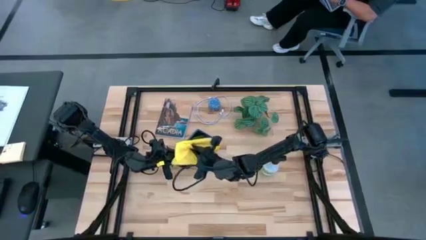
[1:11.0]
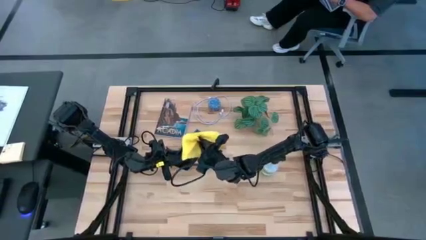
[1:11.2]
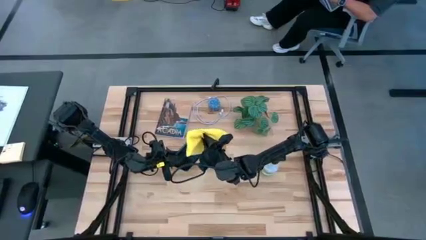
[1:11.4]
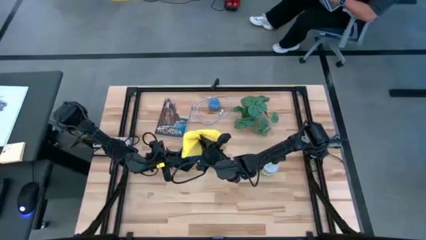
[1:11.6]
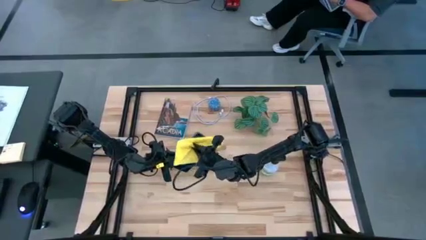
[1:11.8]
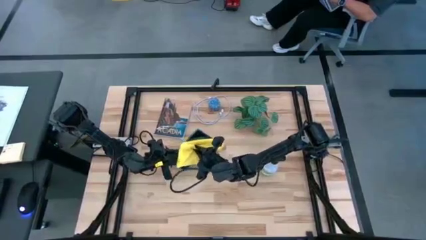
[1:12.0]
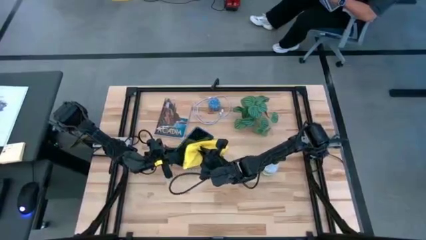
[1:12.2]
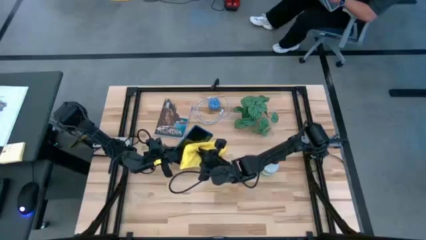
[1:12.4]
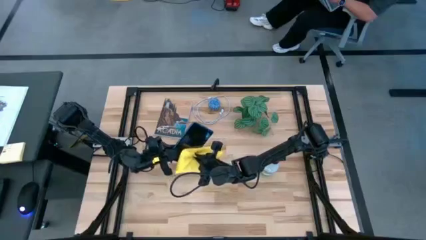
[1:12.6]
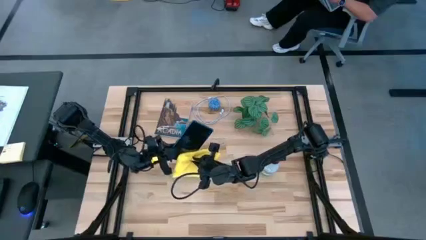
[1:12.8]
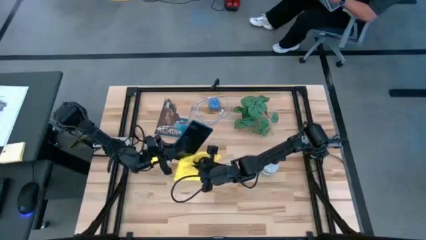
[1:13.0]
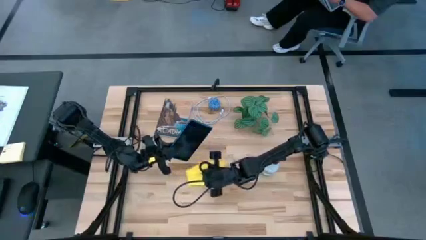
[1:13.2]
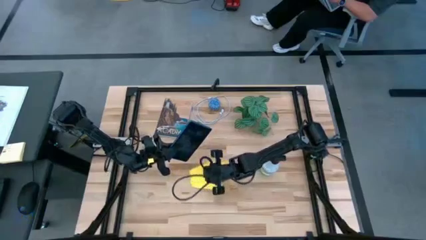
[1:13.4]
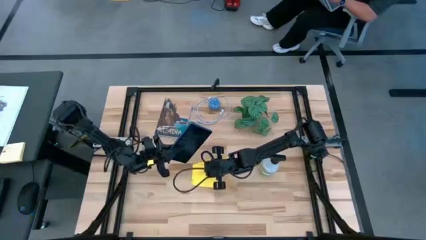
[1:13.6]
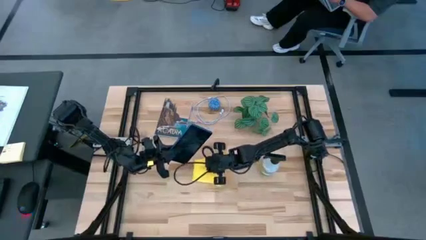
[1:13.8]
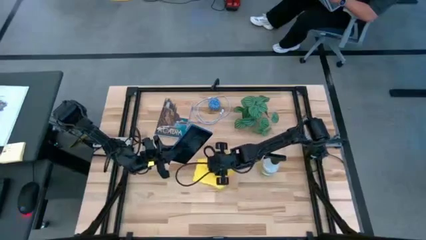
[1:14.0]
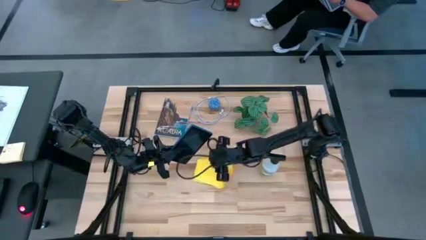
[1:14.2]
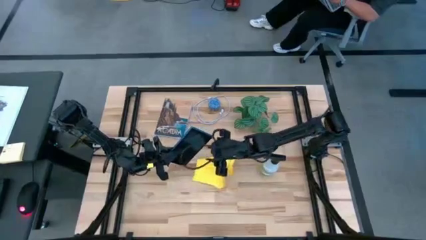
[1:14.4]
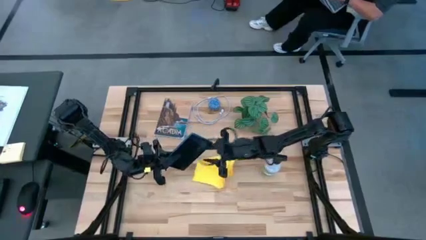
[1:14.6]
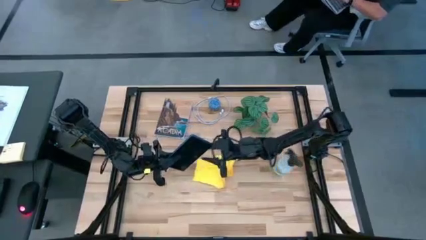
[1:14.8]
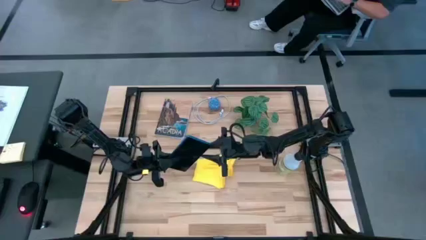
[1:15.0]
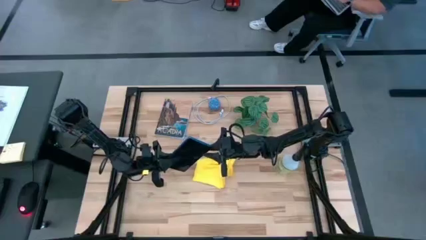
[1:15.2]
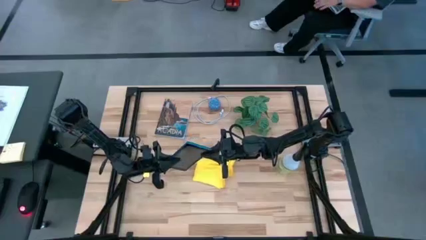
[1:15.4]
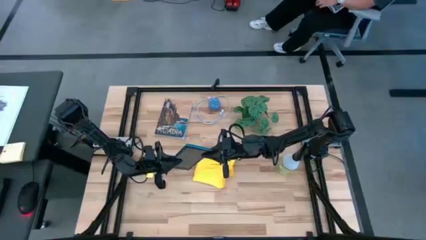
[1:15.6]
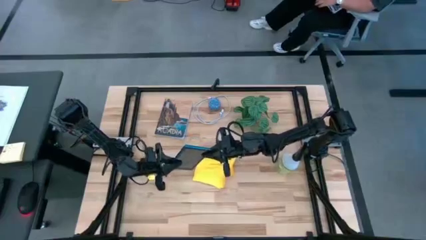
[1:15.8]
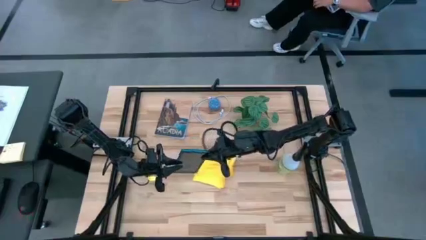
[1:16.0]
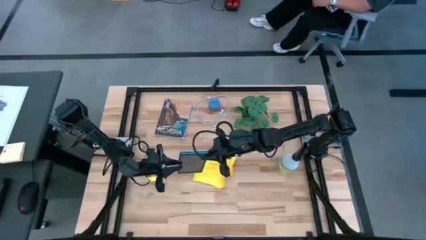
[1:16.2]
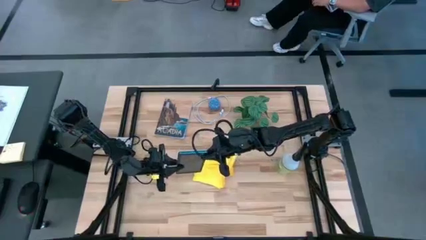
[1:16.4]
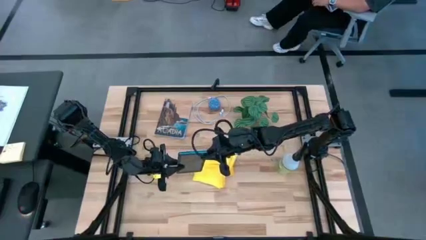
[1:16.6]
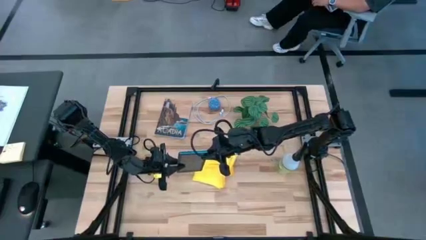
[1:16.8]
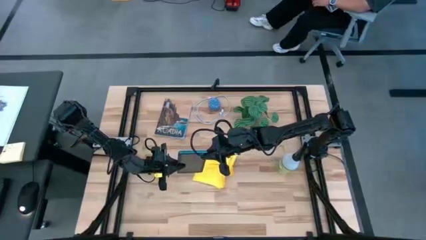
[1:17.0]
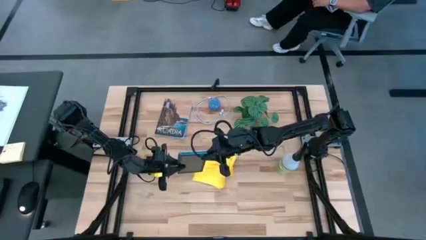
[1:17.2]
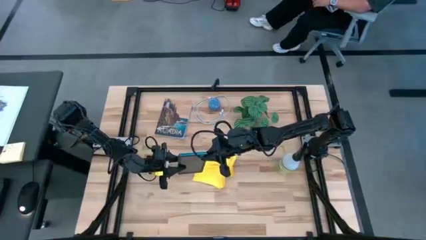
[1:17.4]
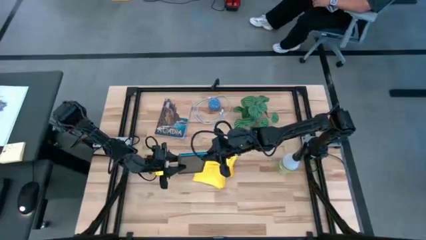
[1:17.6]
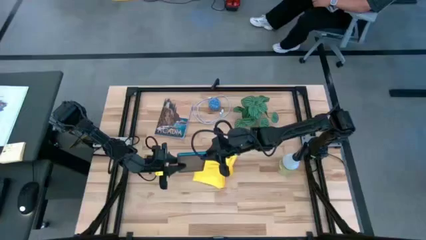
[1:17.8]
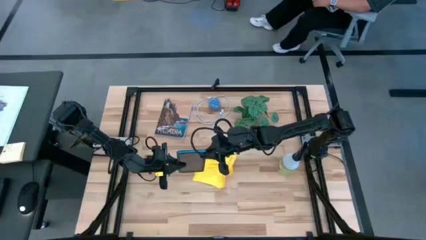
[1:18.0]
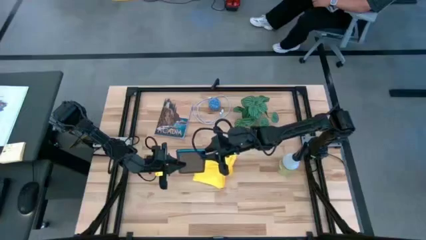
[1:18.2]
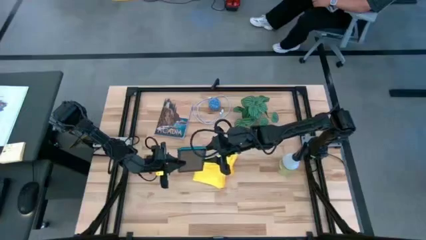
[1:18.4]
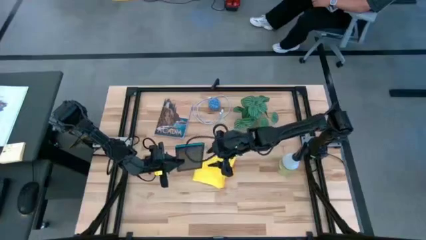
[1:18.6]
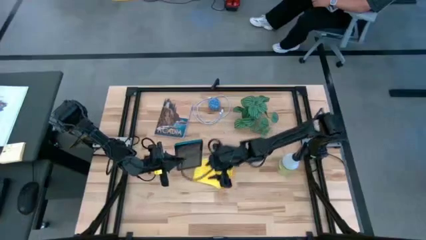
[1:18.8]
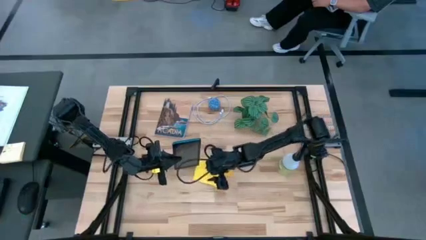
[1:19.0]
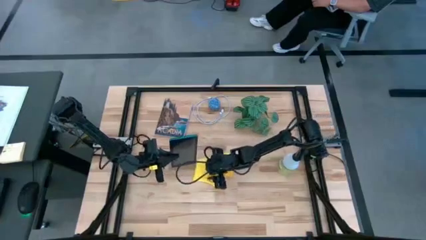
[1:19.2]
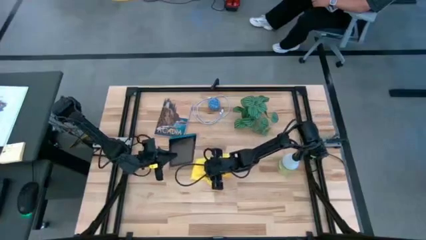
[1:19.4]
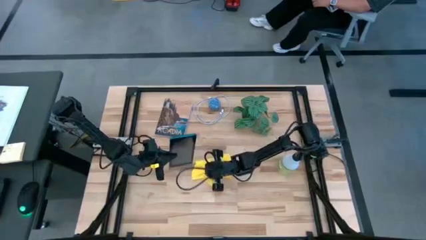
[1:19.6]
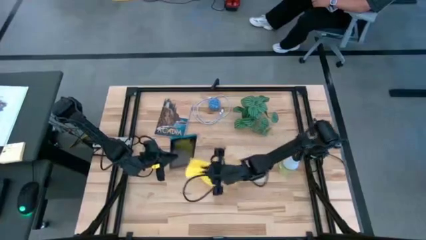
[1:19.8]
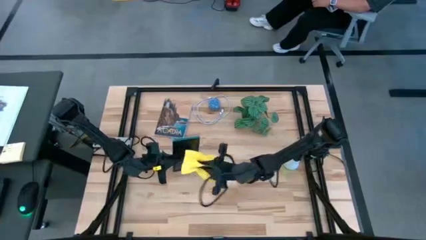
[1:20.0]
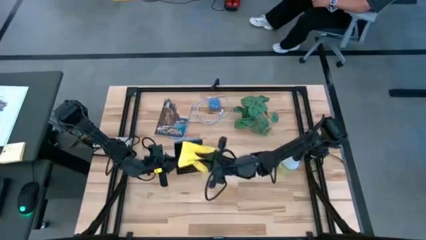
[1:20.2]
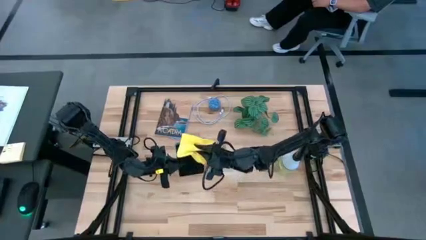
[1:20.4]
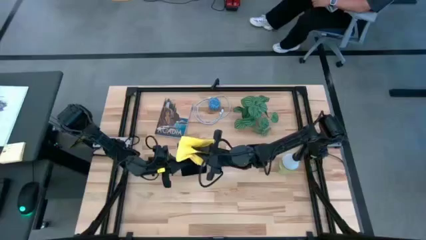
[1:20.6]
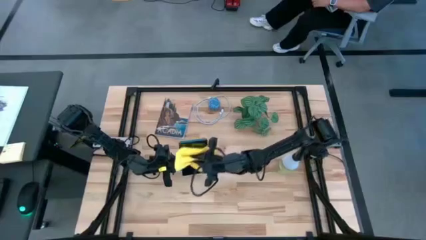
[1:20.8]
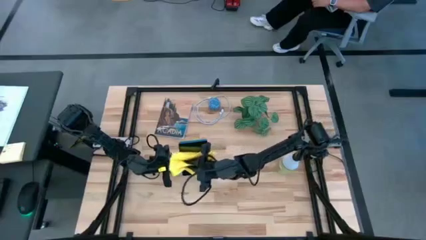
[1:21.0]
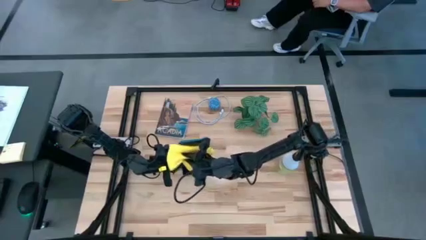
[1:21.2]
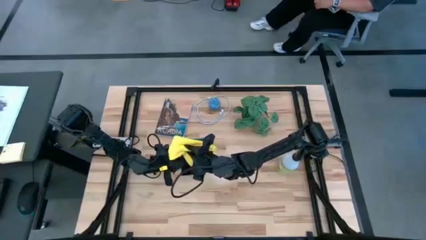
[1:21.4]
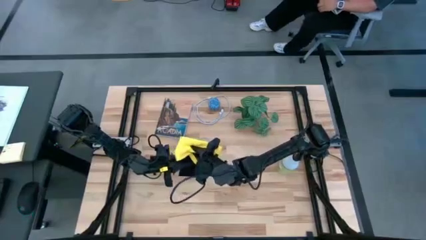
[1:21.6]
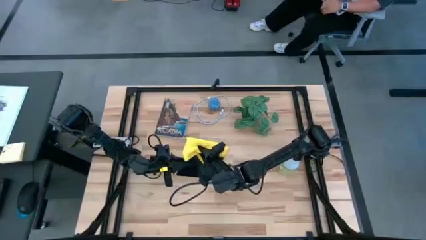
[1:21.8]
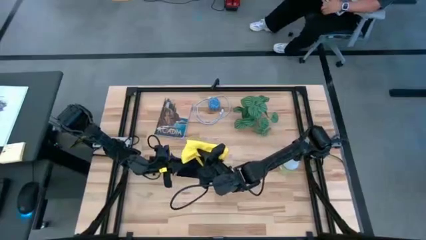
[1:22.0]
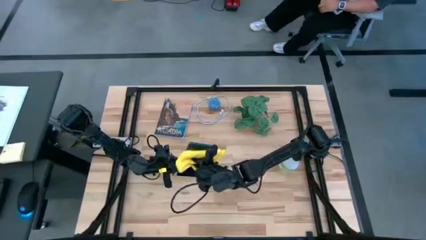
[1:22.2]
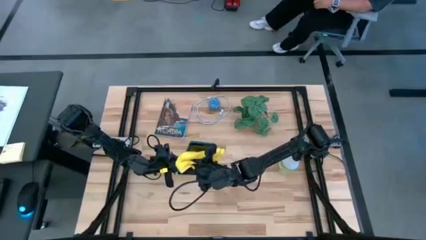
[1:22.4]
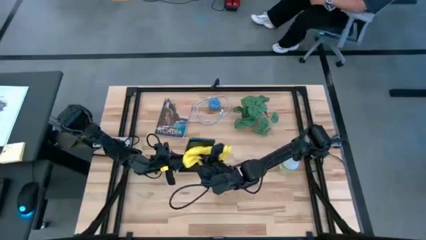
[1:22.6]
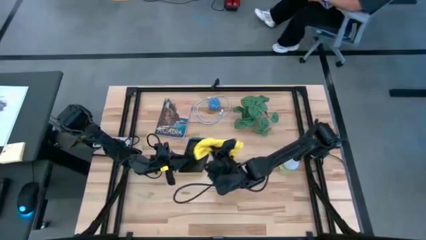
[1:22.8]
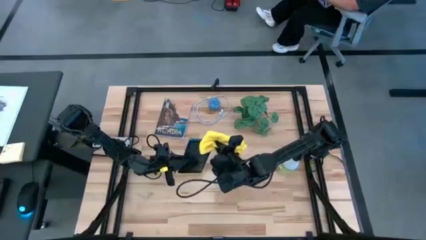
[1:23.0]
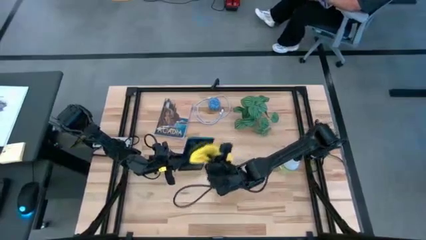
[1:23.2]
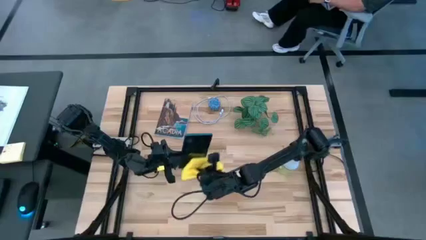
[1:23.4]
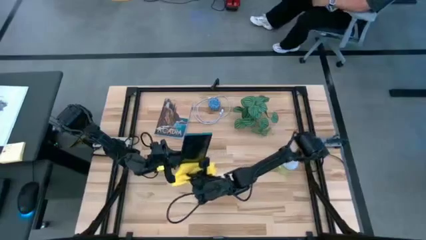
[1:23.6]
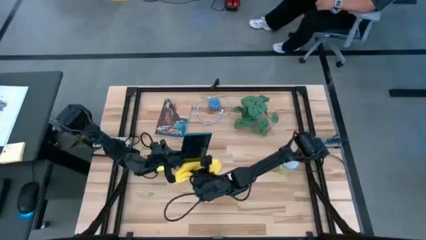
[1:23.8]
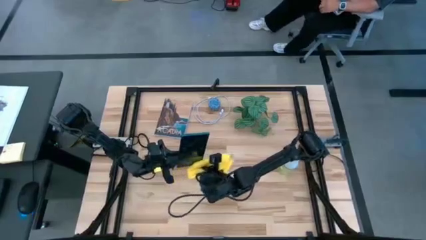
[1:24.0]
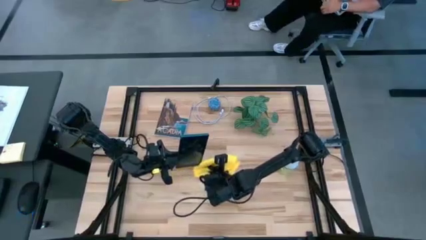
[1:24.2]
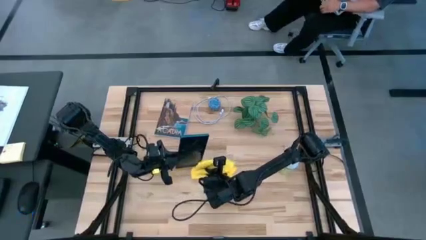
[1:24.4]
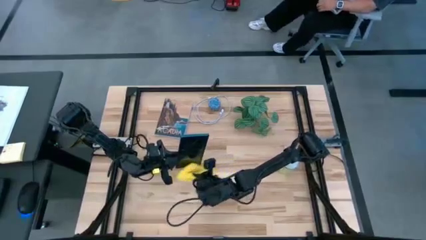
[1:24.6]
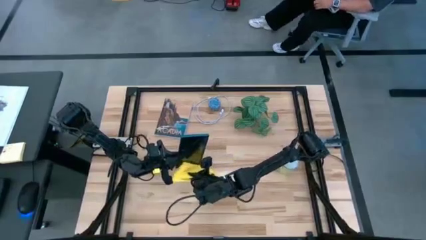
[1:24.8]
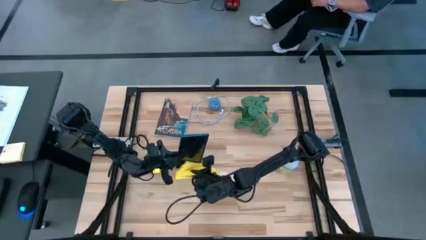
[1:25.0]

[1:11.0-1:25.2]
Task: Clean tablet
Wipe the front of the tablet using microfiber towel
